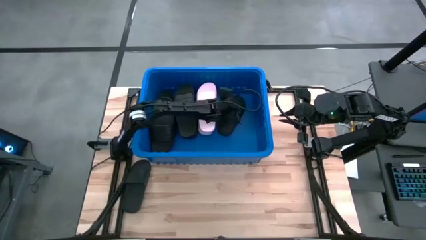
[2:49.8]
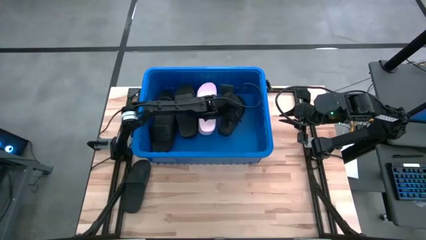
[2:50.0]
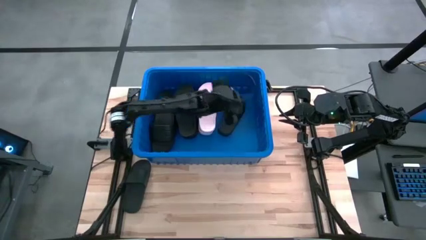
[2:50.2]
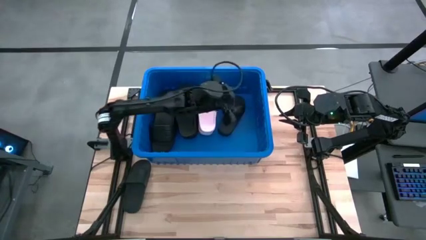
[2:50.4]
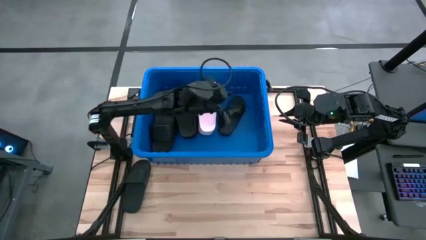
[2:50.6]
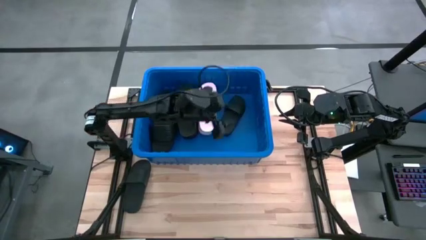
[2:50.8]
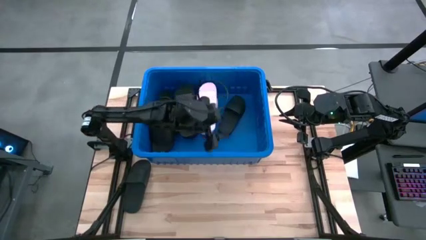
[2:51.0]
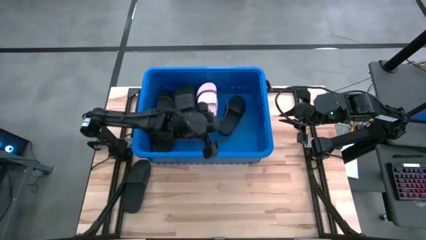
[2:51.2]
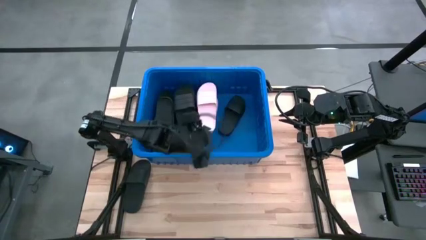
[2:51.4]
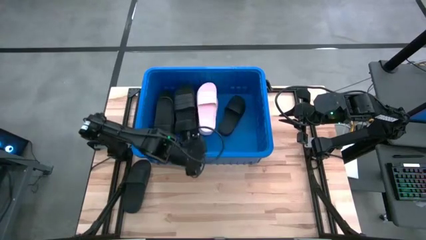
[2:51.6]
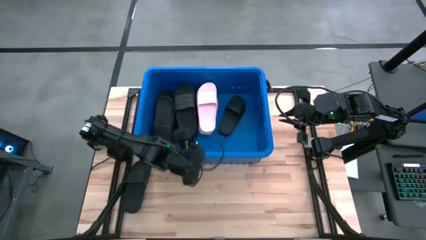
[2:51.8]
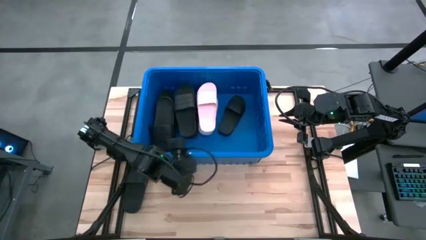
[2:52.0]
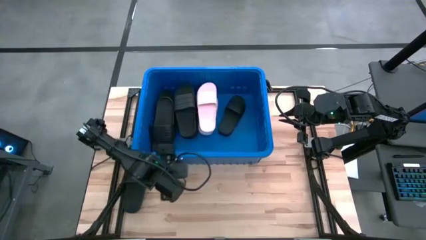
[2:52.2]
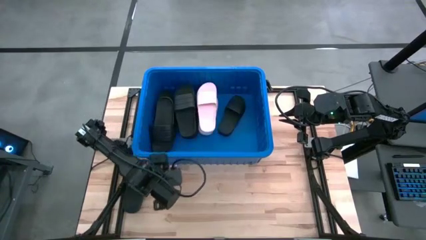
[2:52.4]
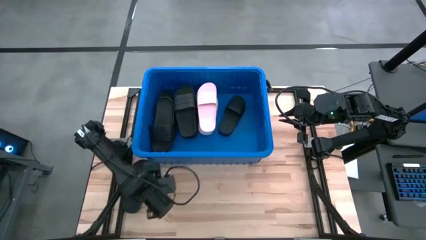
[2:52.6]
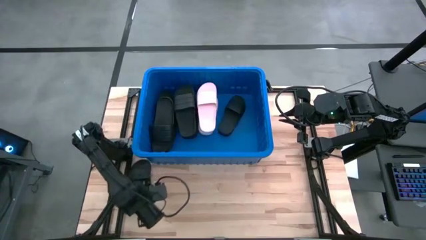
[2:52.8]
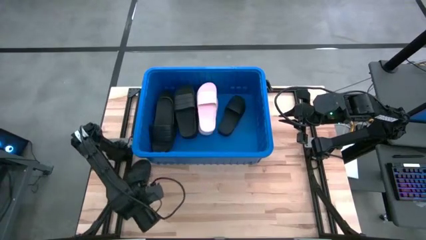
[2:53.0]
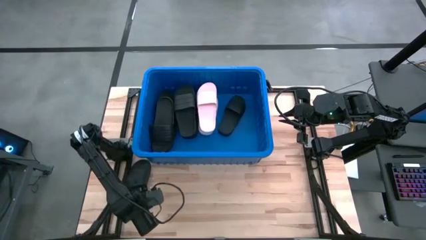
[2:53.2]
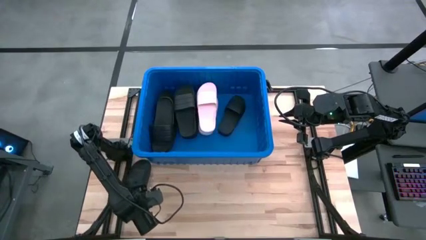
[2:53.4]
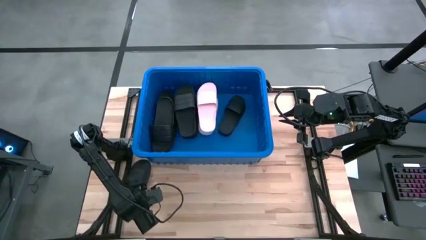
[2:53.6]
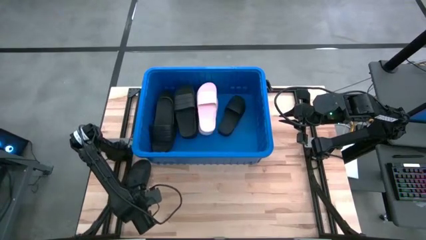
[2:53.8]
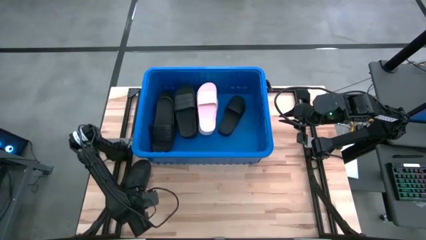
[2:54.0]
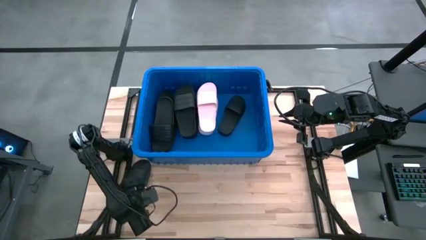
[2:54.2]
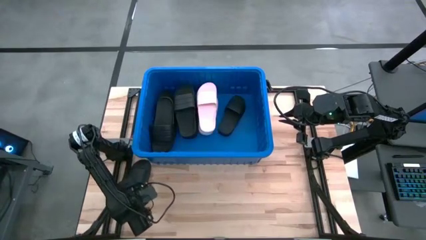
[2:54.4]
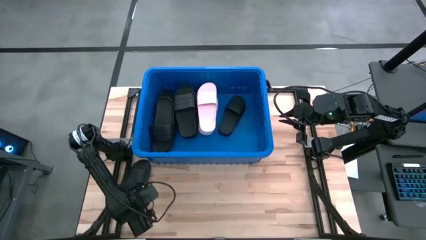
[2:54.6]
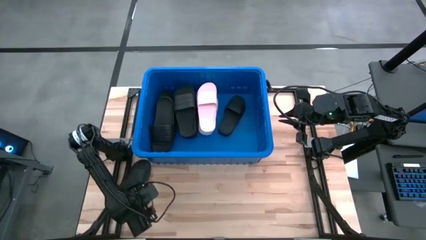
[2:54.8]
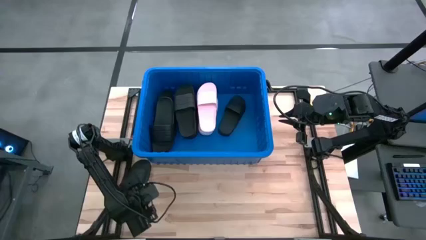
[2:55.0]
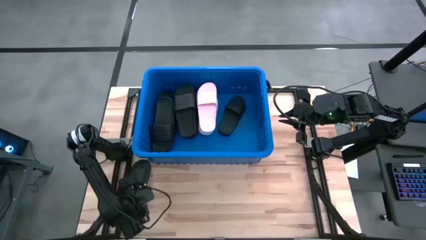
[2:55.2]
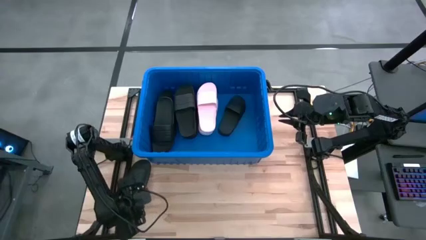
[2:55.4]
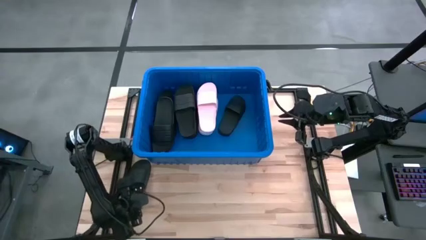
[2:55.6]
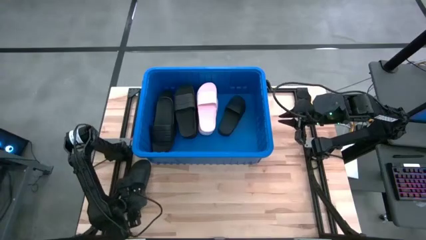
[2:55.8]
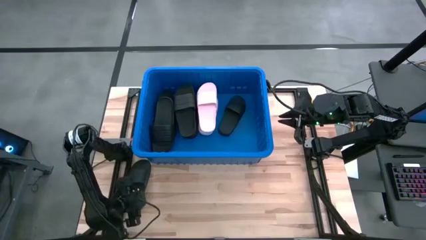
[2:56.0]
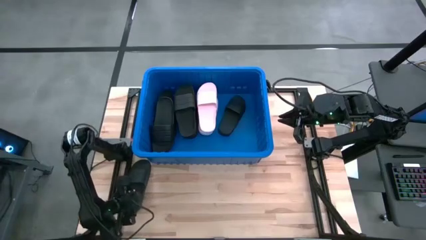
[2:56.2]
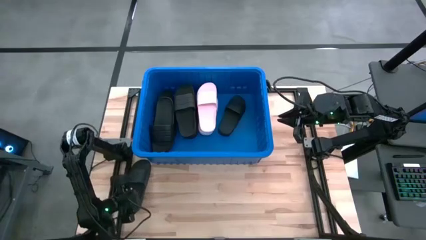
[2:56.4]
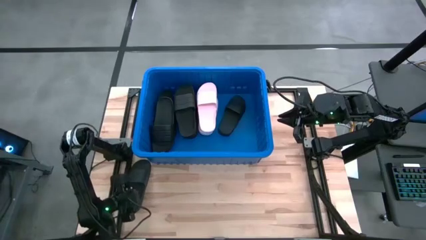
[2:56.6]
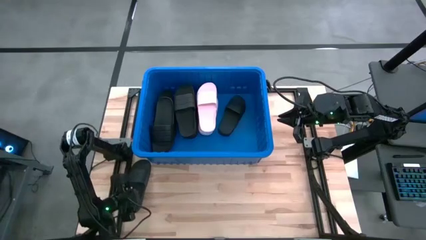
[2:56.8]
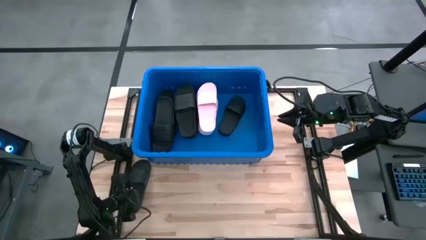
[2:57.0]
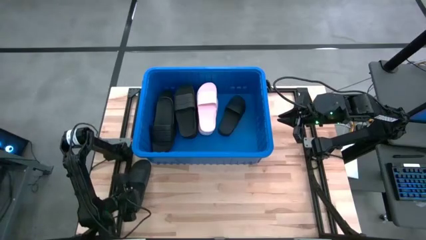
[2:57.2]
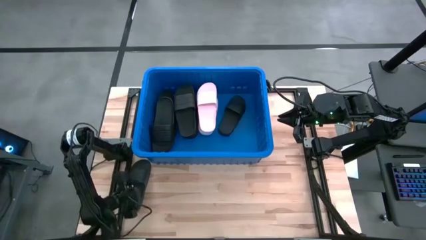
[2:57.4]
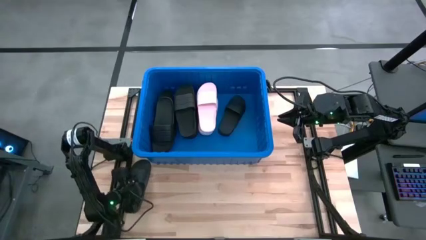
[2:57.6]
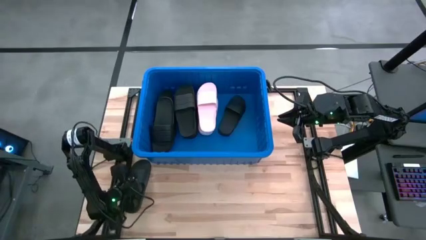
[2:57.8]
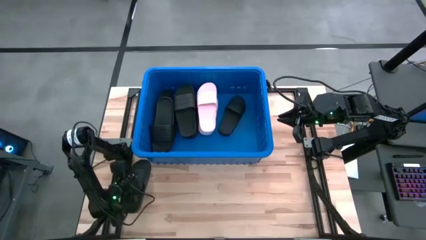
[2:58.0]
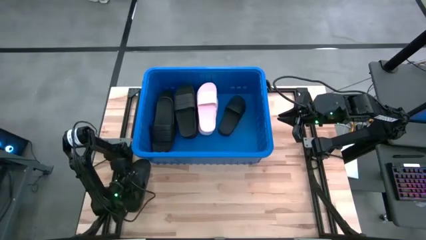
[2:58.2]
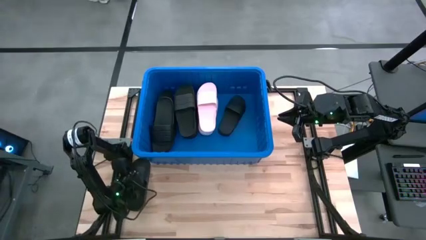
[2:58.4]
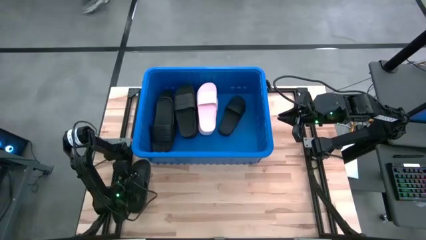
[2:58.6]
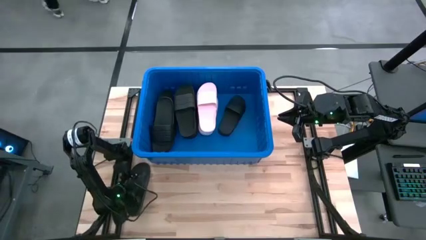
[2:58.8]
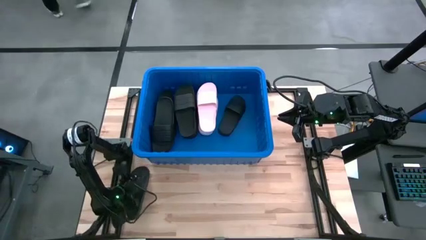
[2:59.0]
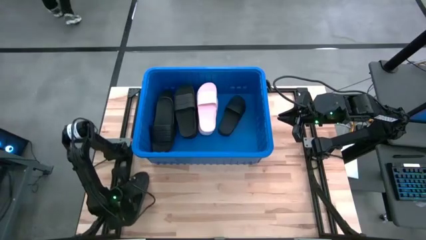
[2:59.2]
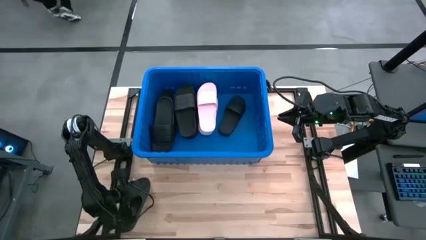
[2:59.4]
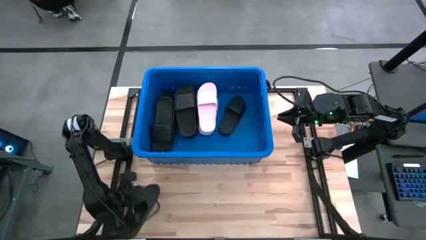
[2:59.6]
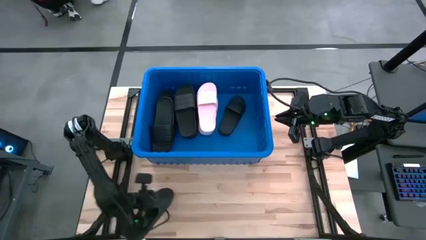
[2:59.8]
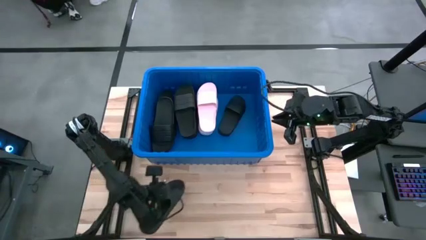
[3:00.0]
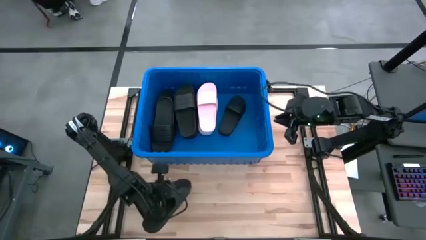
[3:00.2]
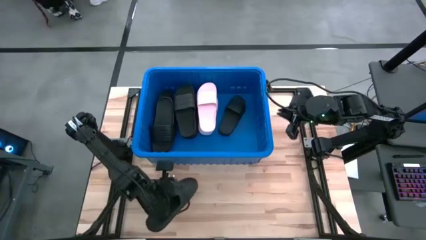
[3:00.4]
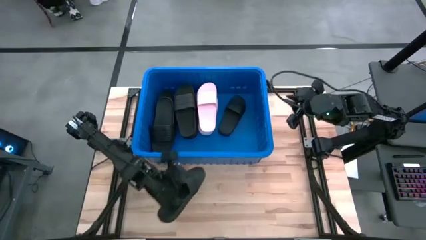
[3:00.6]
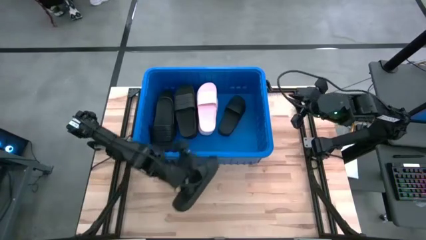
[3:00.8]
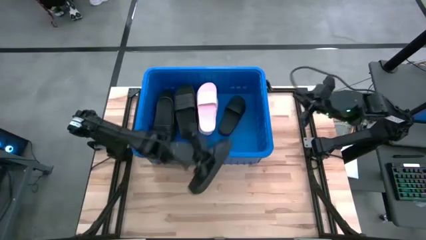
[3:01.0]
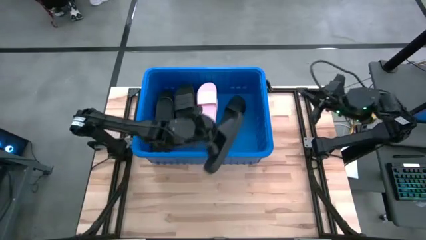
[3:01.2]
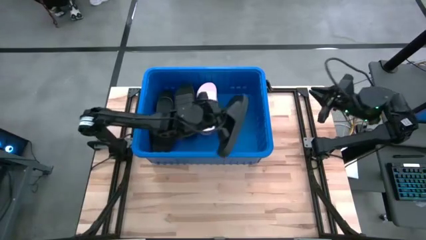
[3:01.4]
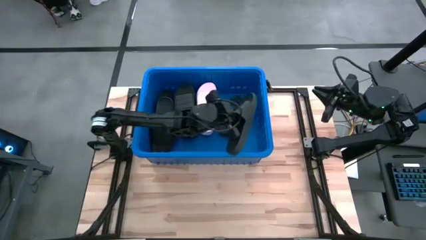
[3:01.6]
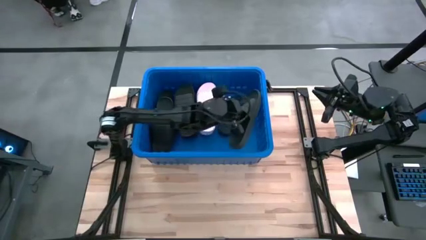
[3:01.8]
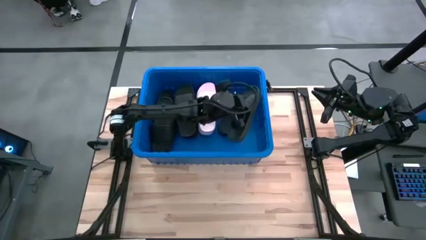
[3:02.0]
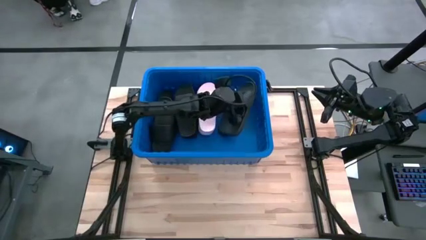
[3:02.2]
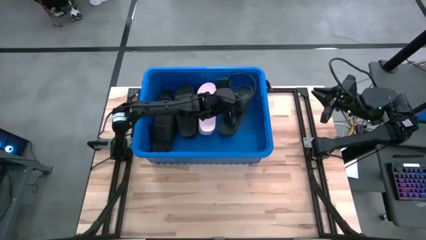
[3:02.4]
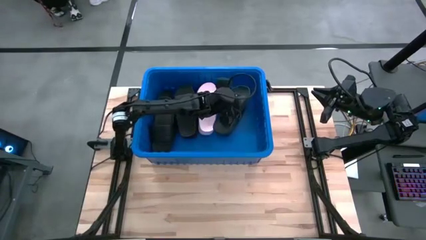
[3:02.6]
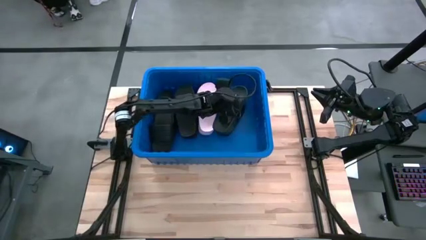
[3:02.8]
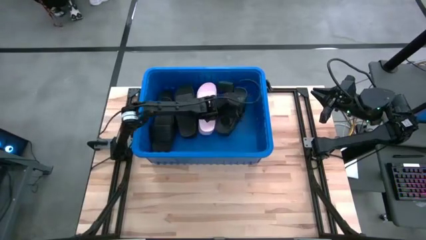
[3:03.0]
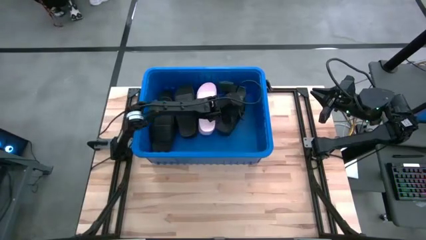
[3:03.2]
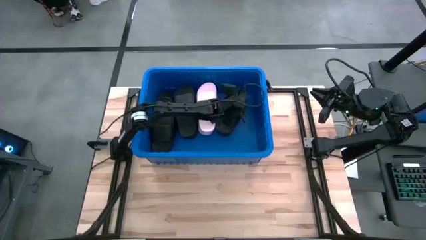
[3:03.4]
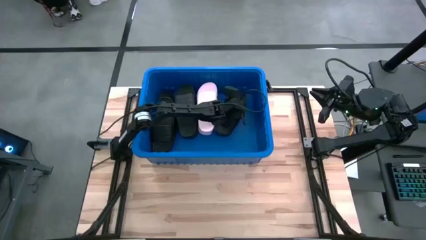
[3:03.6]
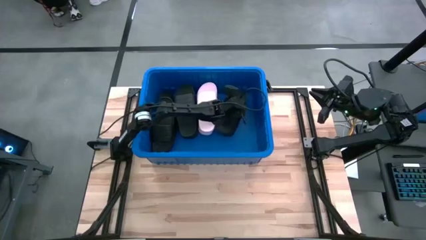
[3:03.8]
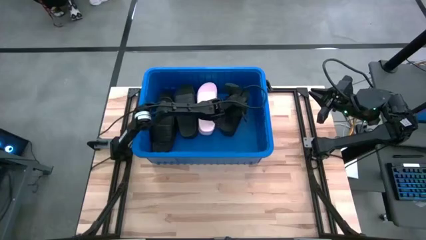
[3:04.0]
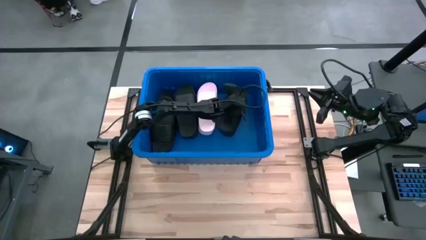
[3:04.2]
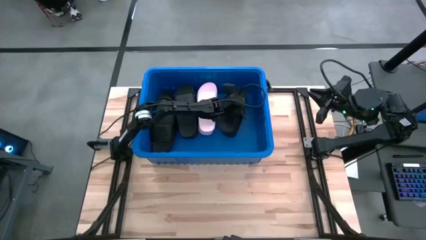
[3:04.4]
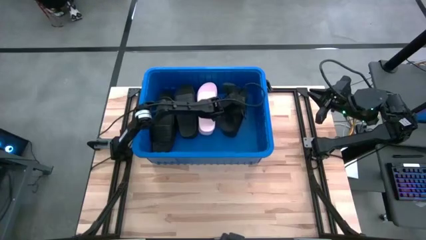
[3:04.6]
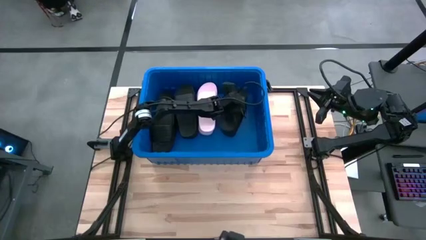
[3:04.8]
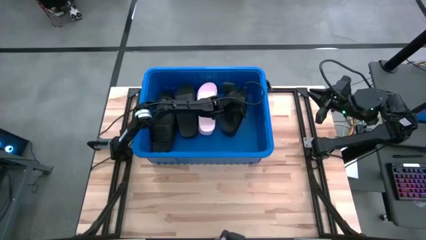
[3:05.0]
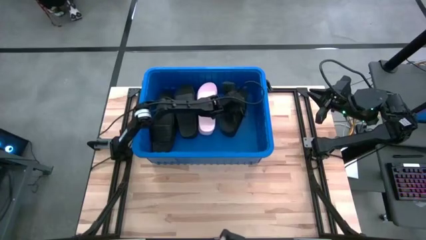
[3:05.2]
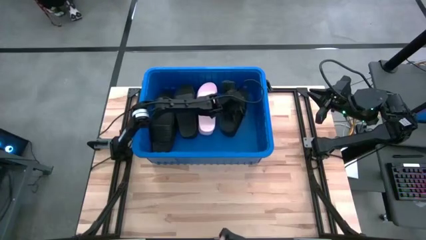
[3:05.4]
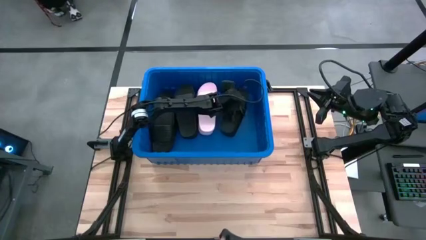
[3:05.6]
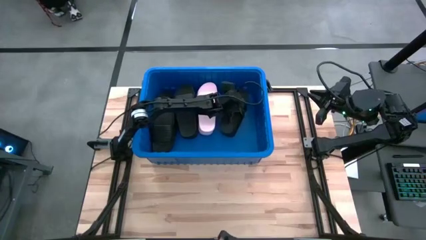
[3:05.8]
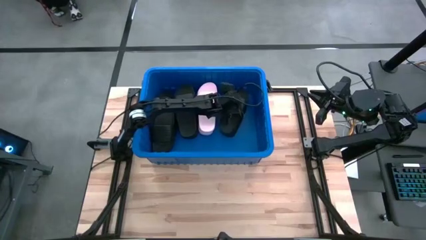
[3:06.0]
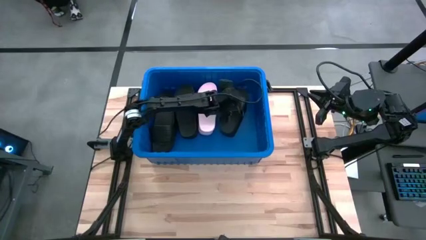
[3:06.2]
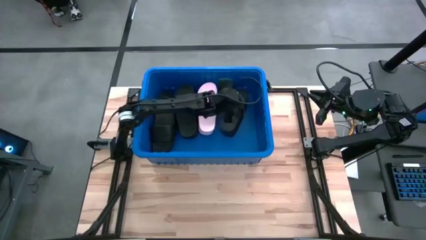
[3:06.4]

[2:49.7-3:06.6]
Task: Pick and place slides into bin
Stack the black slide on top of the black slide into the blue container

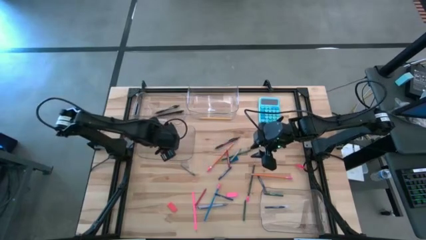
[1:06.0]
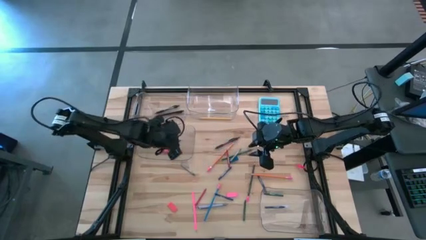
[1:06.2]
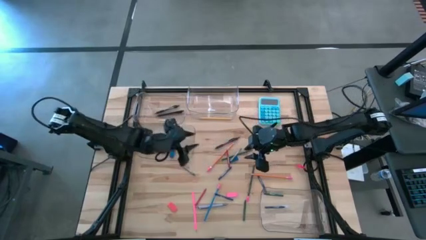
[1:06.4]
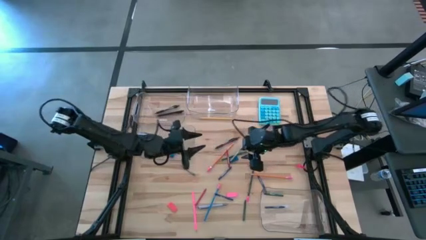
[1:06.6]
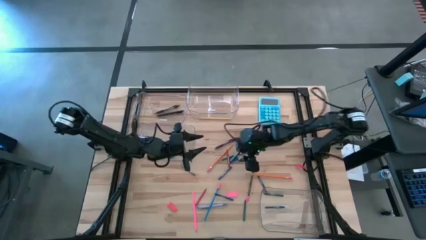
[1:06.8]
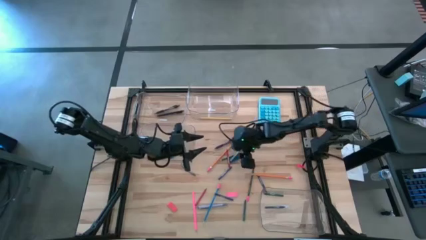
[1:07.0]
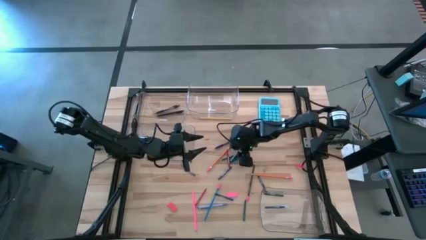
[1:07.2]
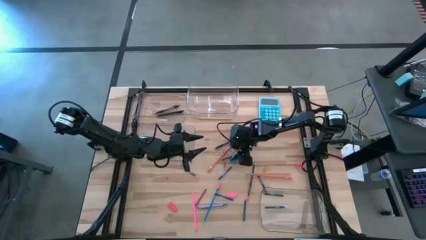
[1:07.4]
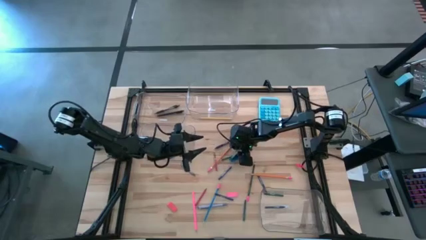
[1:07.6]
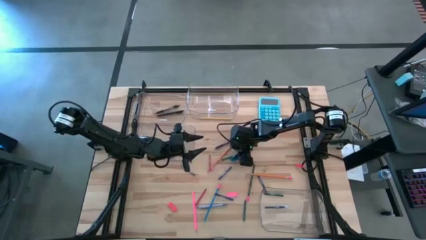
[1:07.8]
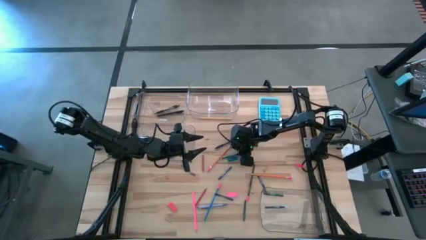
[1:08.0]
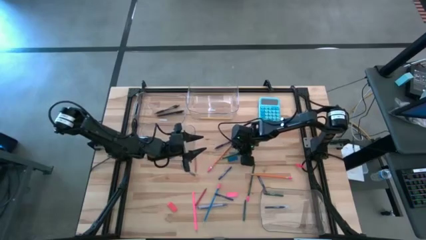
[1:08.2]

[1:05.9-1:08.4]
Task: Sort crayons/erasers/pens/pencils in bins
Put the gray crayon into the bottom right transparent bin
